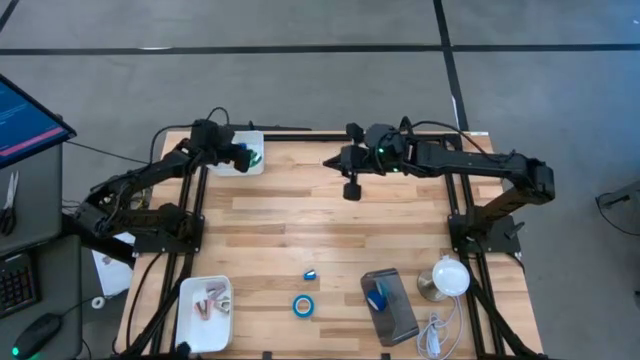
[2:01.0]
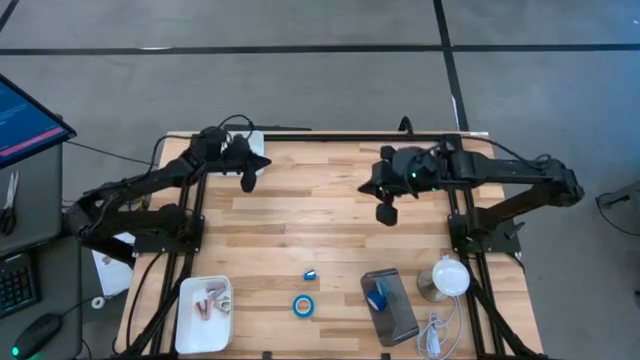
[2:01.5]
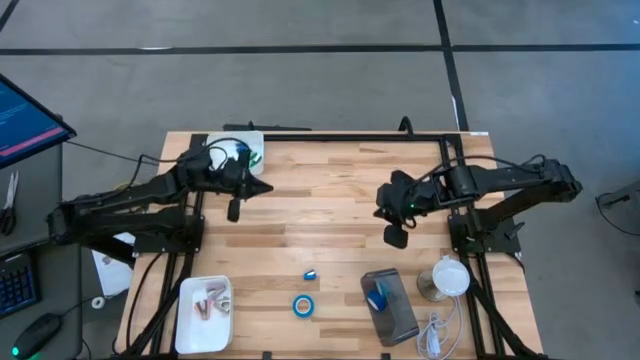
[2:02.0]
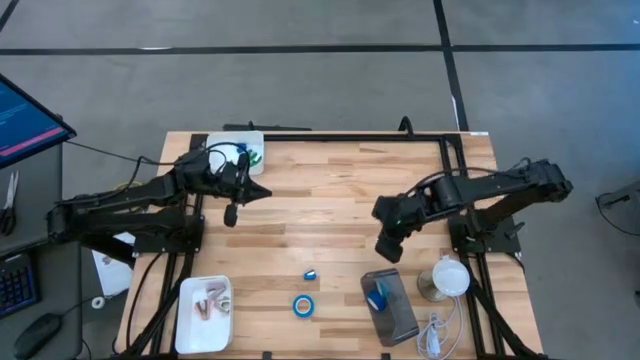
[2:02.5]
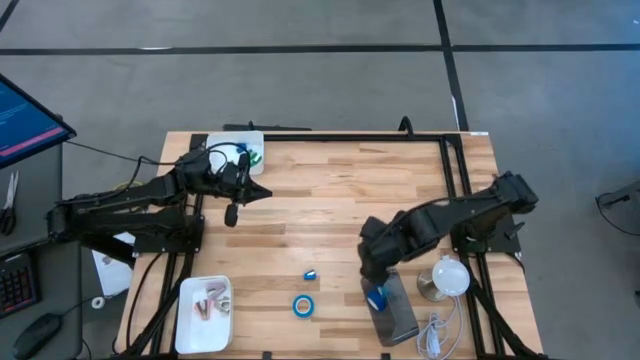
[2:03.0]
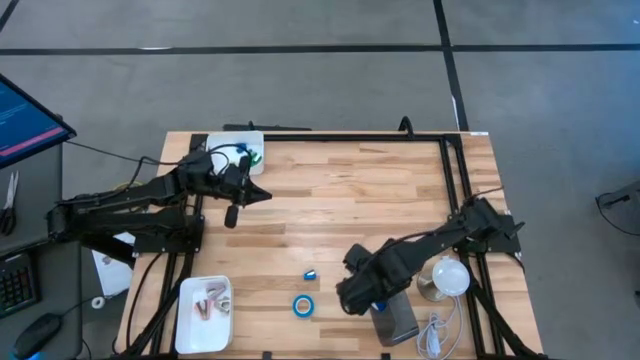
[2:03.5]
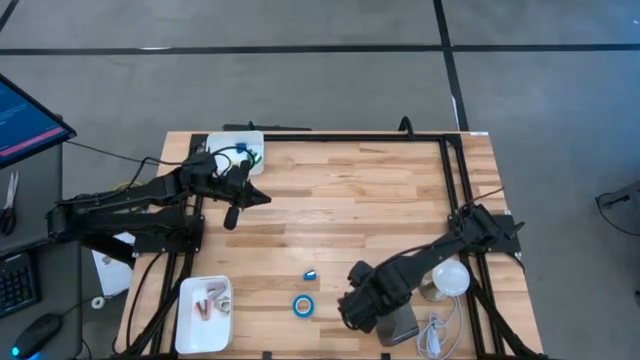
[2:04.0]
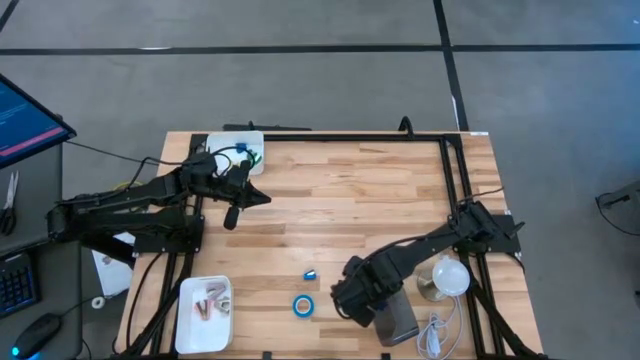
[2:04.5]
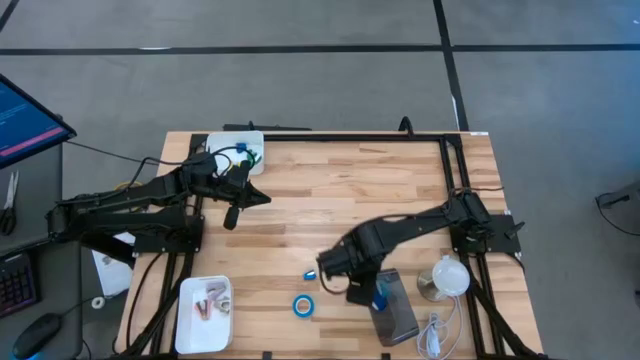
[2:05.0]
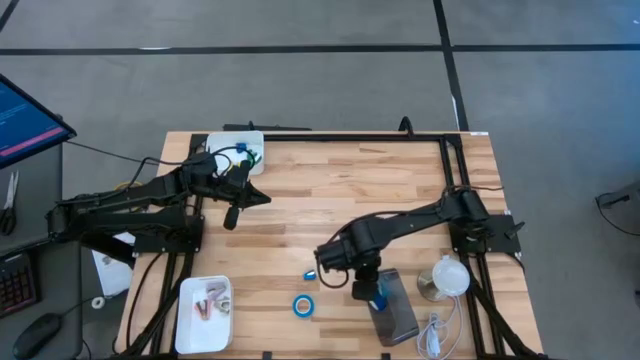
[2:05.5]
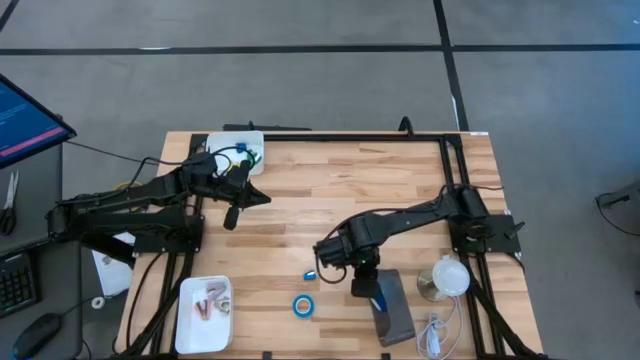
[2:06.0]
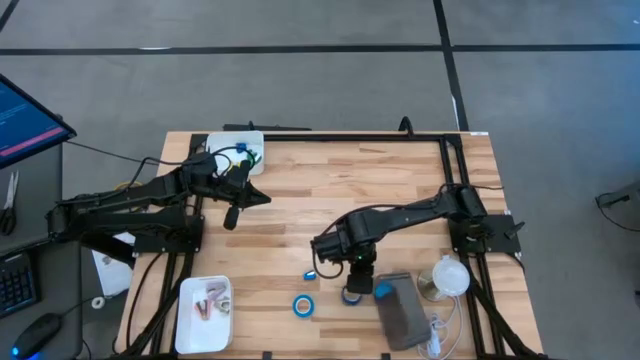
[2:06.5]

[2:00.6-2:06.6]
Task: Pick and place Stapler, Stapler remover, tape
Adjust the black bin

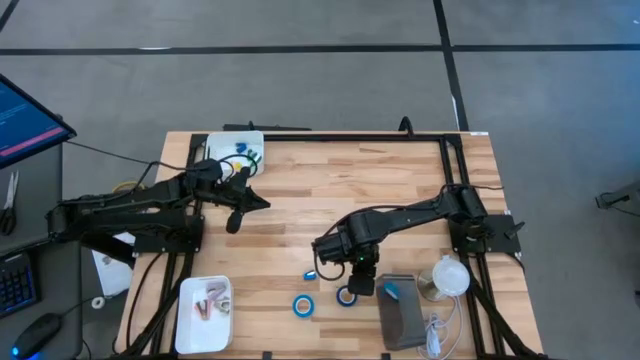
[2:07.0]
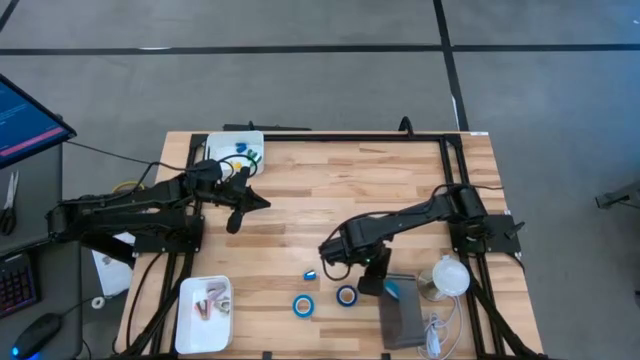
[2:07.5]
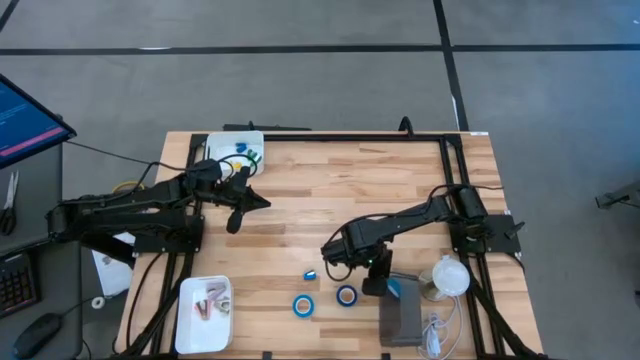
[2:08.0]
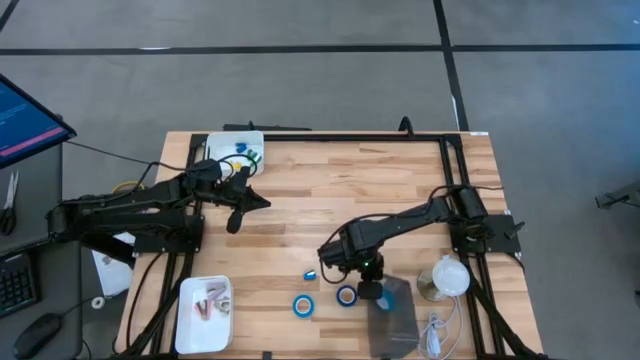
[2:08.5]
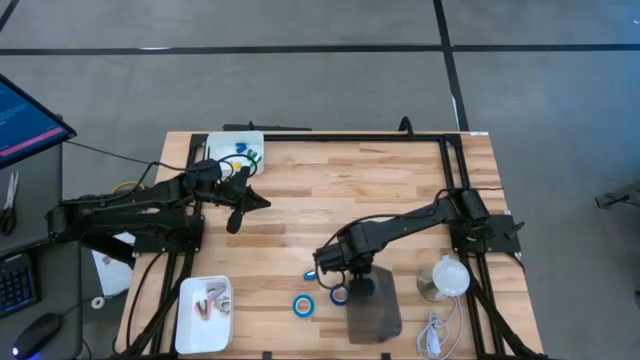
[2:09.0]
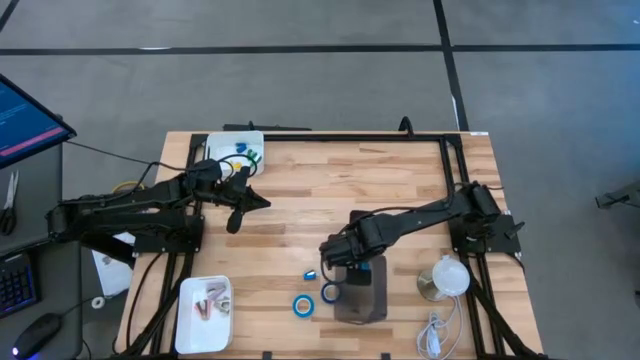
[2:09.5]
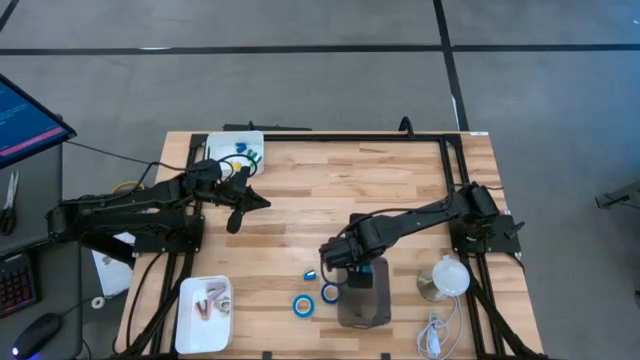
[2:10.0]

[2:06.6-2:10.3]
Adjust the black bin

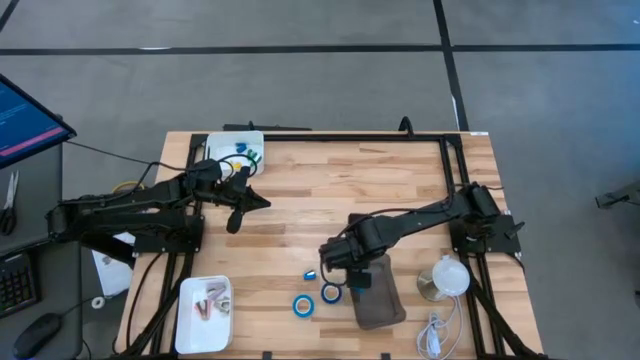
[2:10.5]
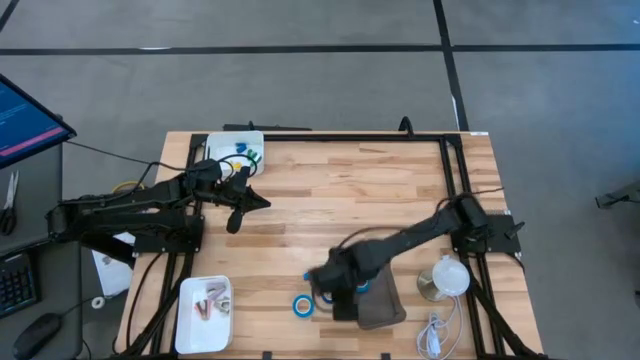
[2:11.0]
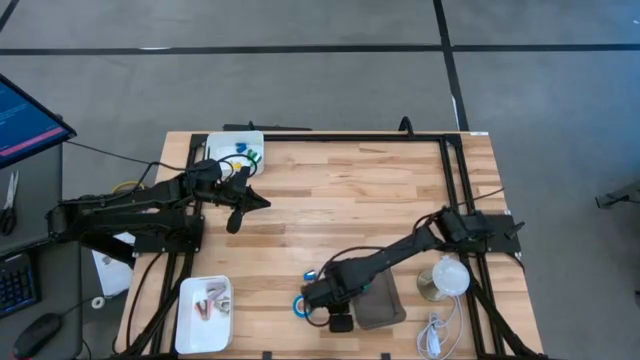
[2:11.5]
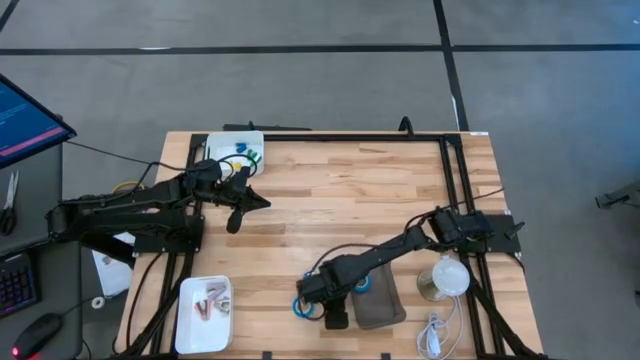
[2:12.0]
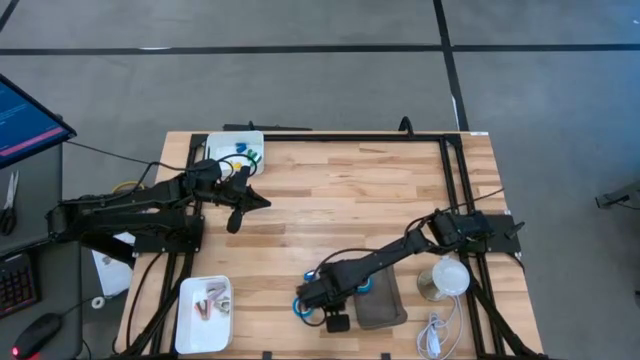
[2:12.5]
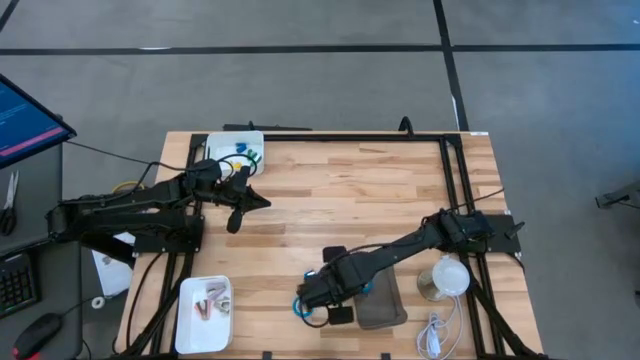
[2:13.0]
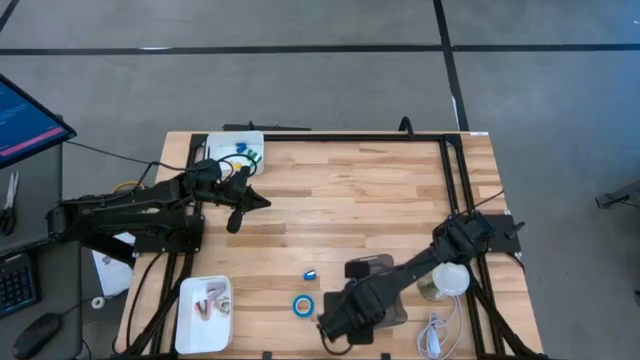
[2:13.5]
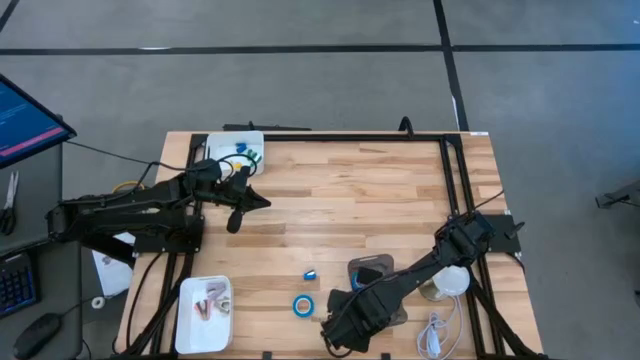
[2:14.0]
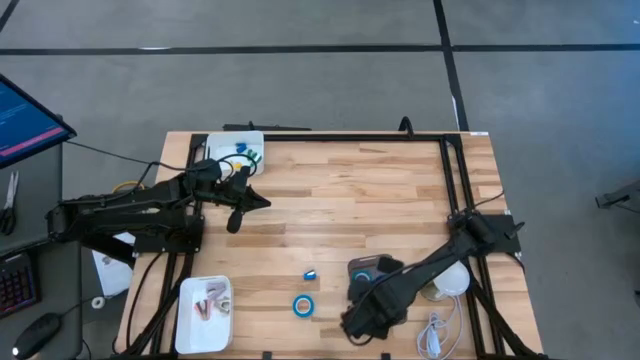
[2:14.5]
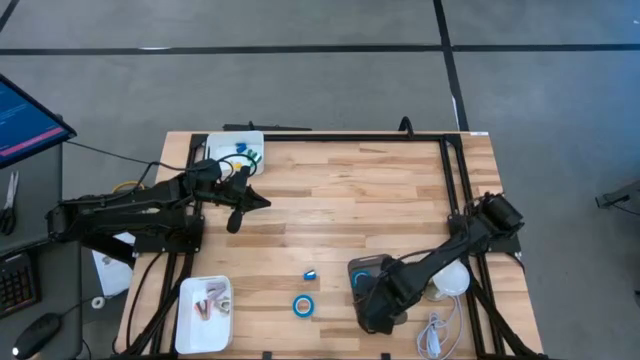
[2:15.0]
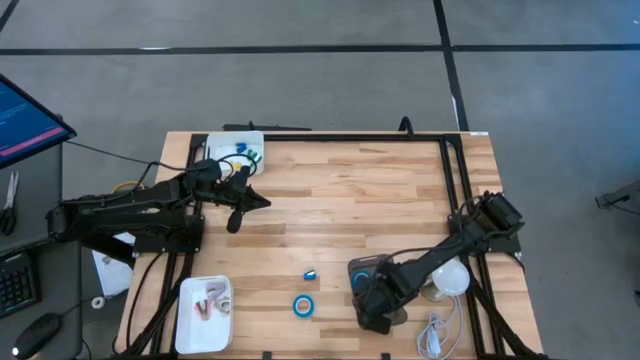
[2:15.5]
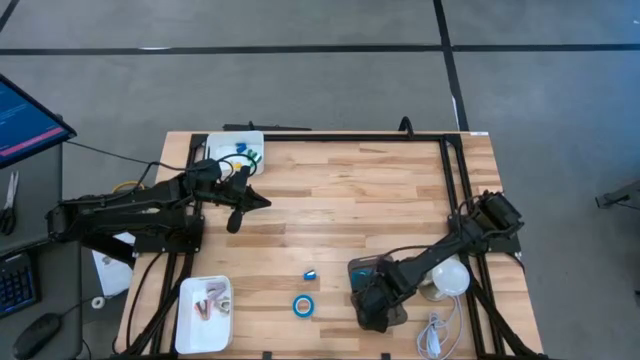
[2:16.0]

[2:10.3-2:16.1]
Put the blue tape into the black bin

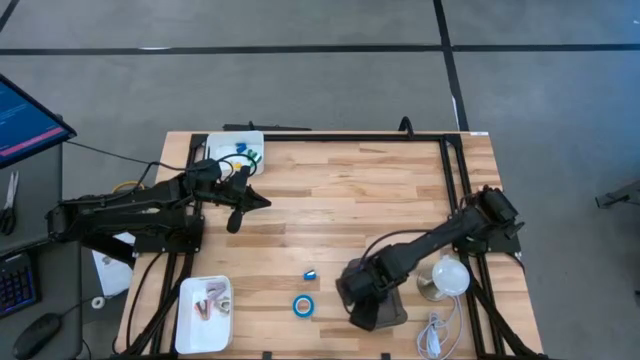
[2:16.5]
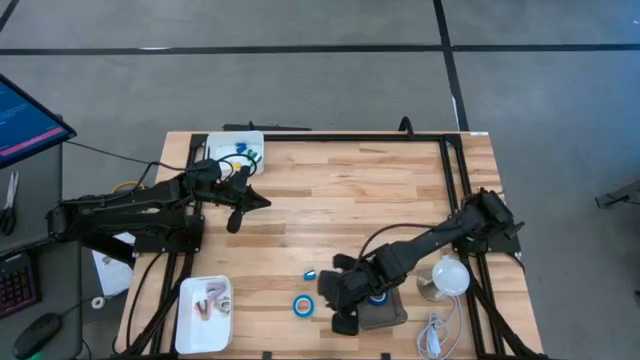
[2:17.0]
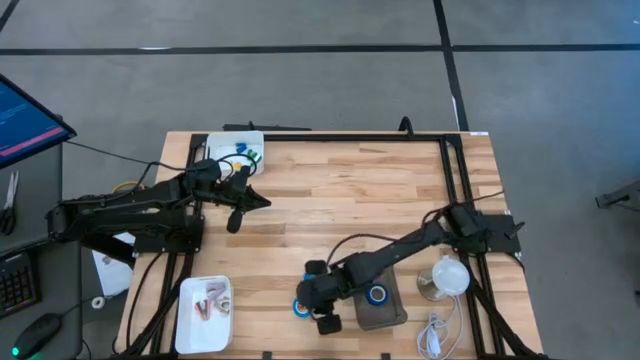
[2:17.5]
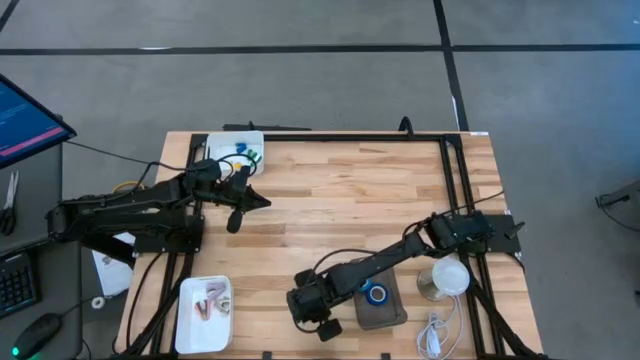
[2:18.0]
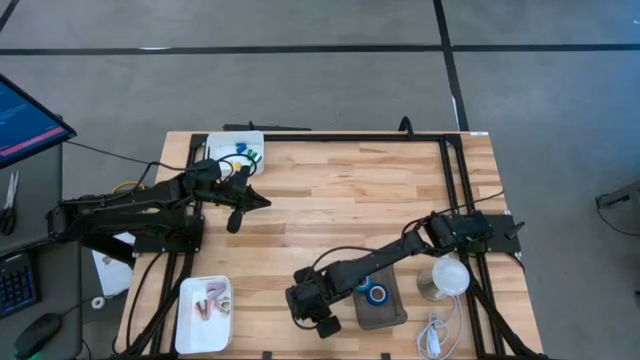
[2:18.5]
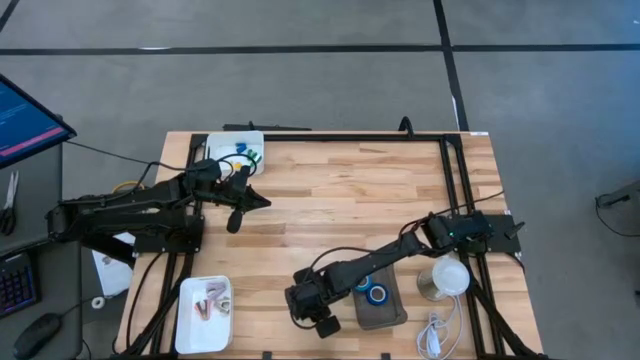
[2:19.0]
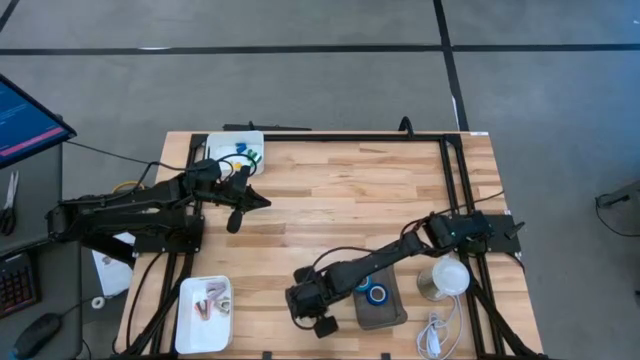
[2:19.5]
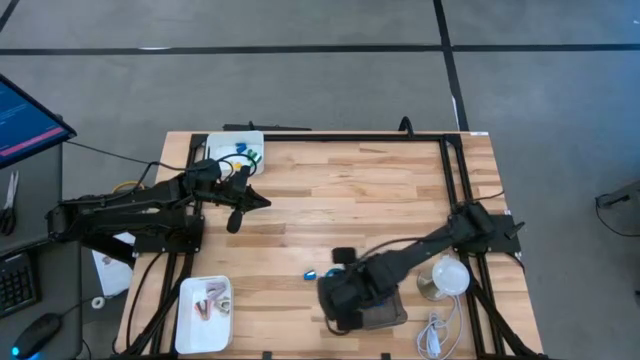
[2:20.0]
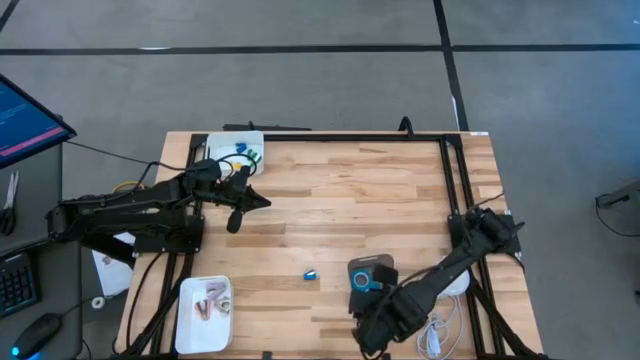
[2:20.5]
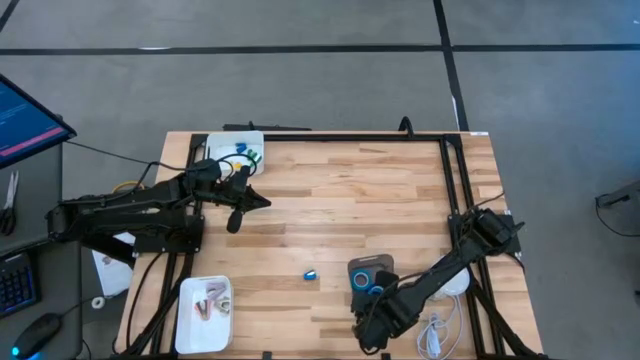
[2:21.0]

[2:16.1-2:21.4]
Put the light blue tape into the black bin
